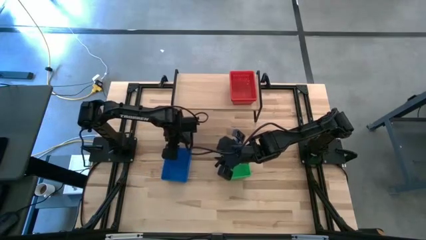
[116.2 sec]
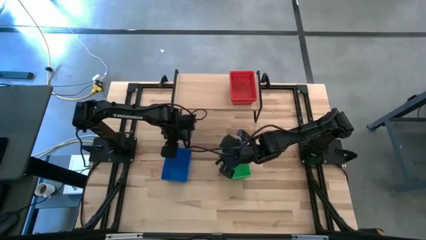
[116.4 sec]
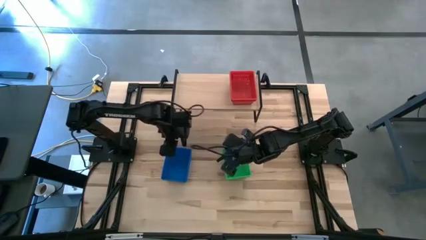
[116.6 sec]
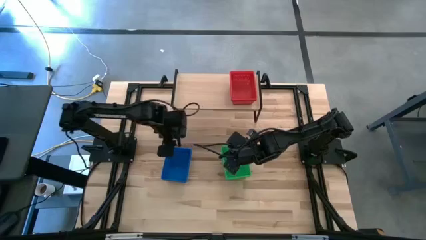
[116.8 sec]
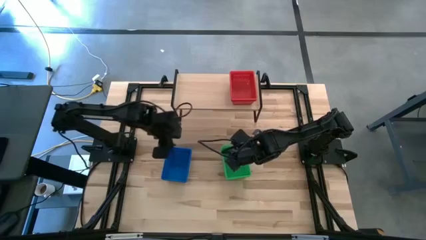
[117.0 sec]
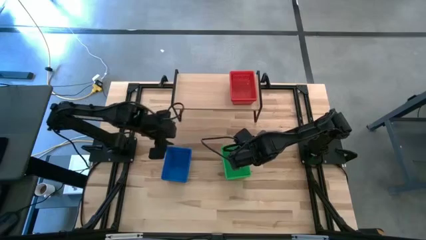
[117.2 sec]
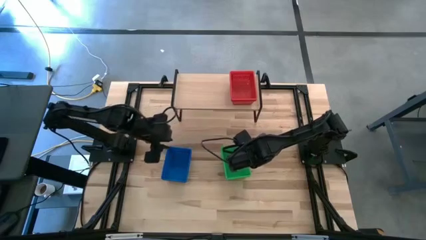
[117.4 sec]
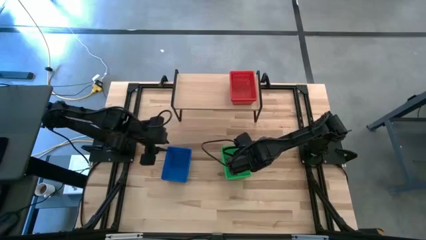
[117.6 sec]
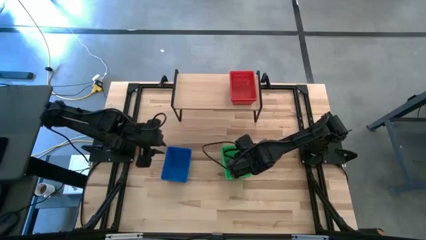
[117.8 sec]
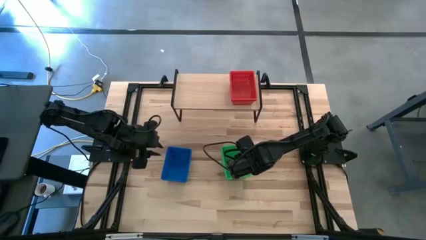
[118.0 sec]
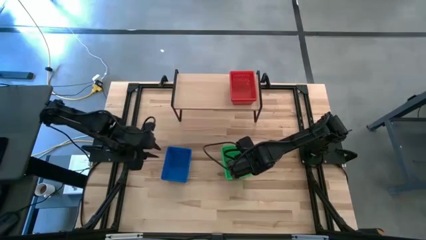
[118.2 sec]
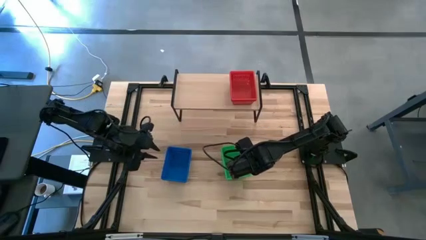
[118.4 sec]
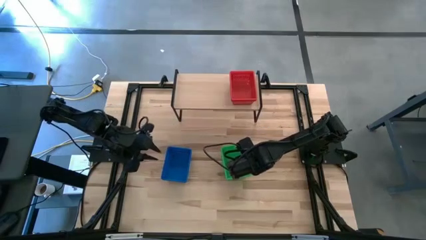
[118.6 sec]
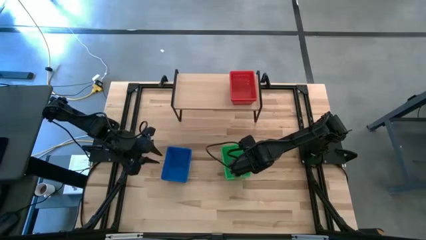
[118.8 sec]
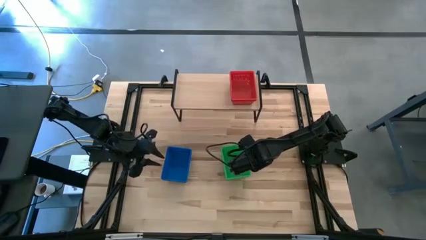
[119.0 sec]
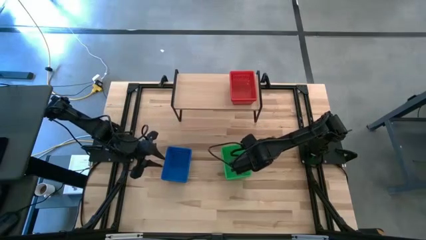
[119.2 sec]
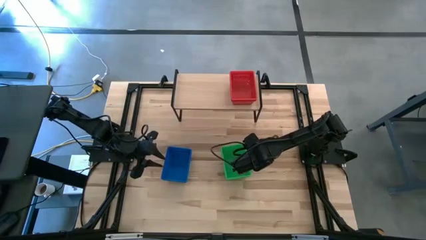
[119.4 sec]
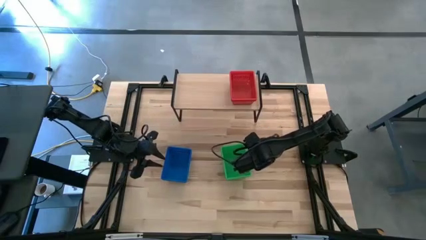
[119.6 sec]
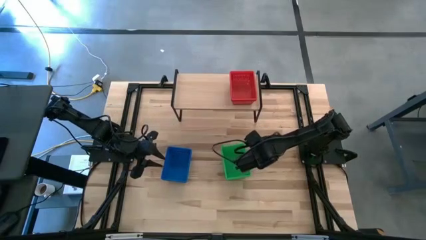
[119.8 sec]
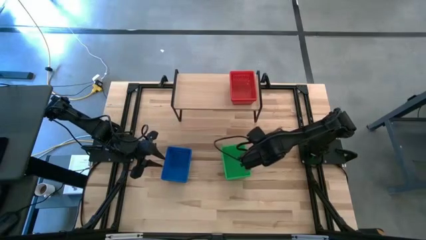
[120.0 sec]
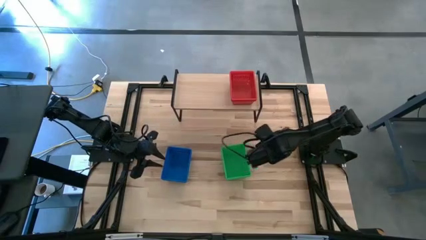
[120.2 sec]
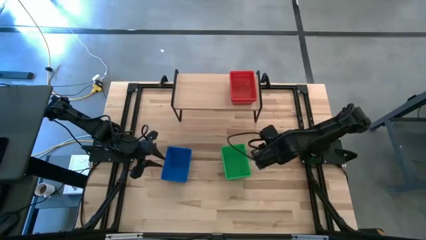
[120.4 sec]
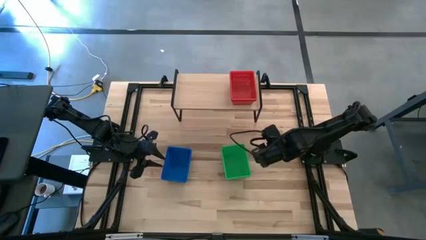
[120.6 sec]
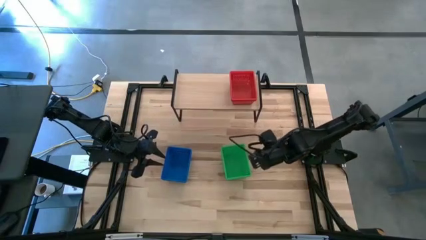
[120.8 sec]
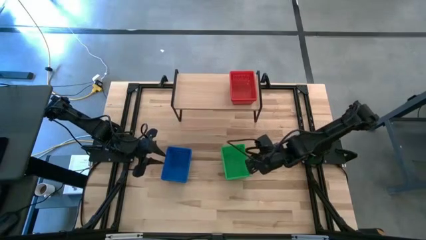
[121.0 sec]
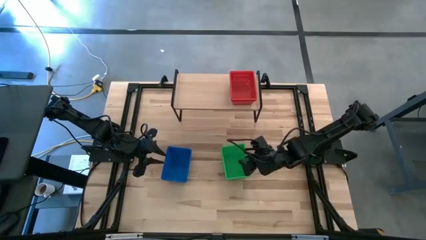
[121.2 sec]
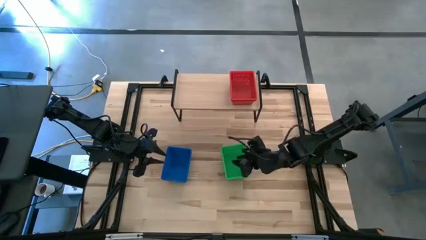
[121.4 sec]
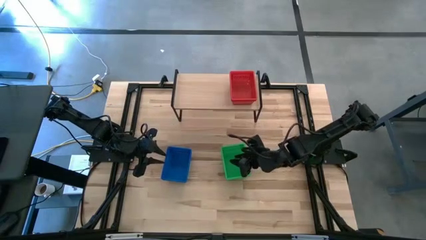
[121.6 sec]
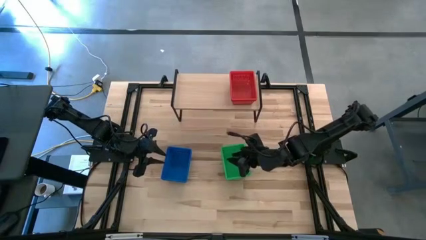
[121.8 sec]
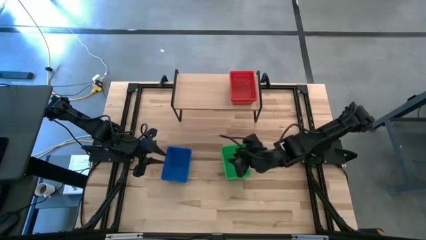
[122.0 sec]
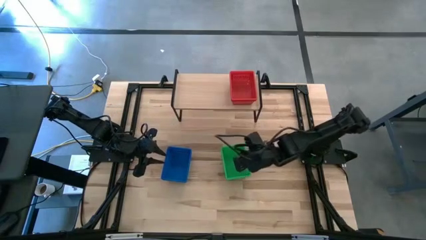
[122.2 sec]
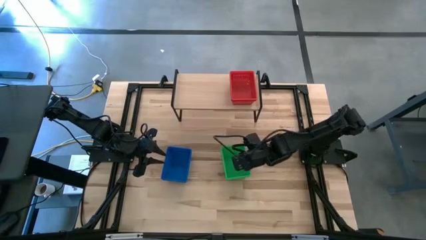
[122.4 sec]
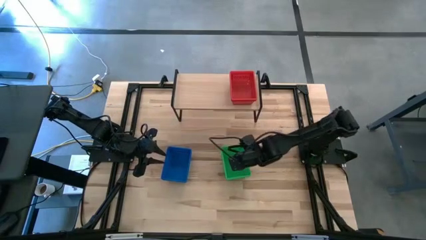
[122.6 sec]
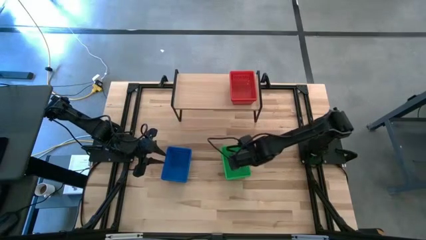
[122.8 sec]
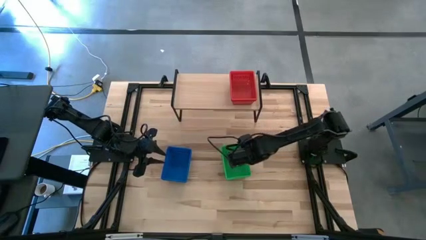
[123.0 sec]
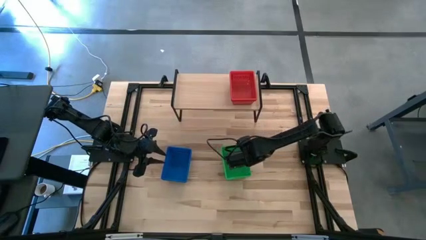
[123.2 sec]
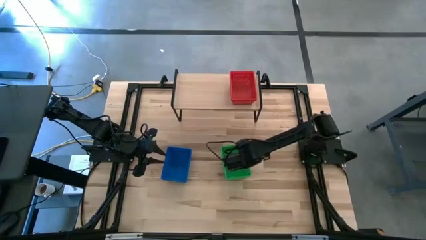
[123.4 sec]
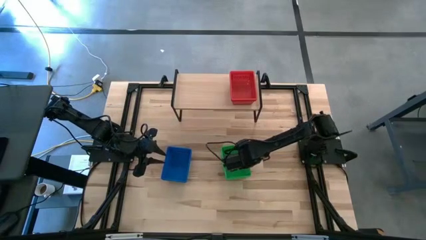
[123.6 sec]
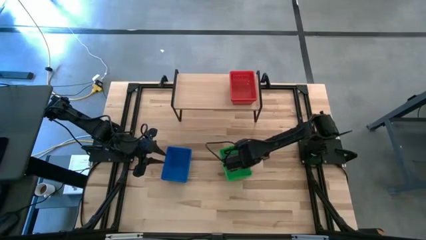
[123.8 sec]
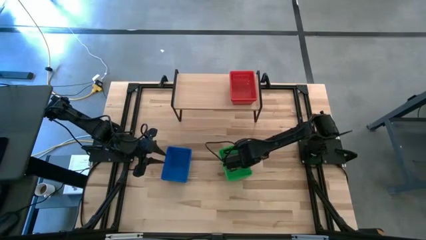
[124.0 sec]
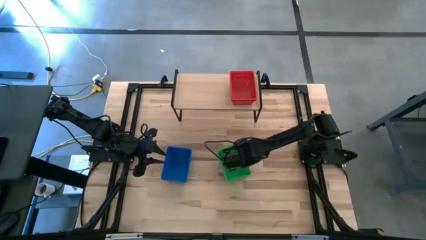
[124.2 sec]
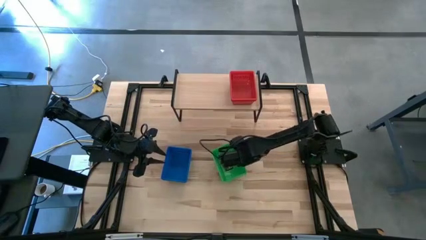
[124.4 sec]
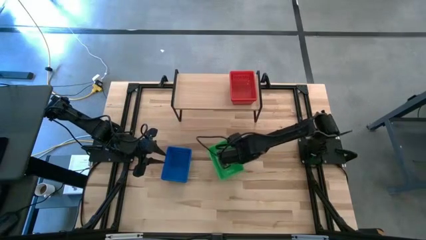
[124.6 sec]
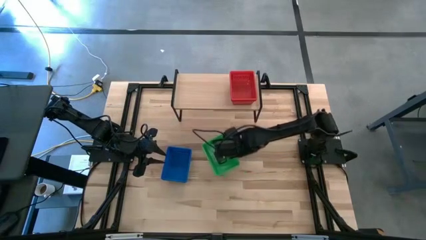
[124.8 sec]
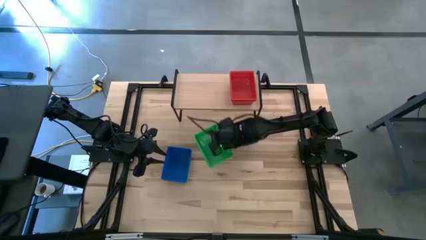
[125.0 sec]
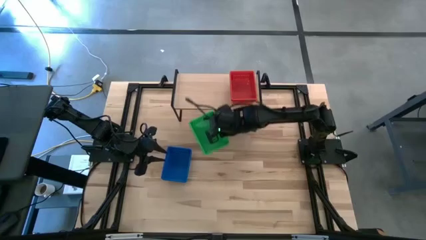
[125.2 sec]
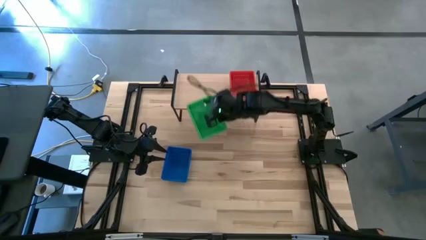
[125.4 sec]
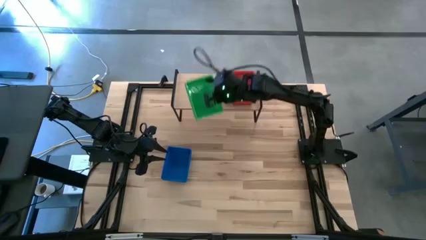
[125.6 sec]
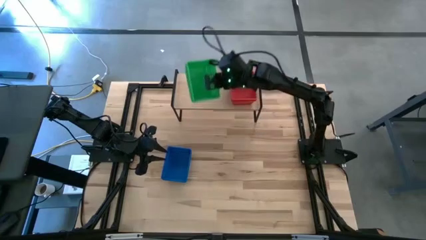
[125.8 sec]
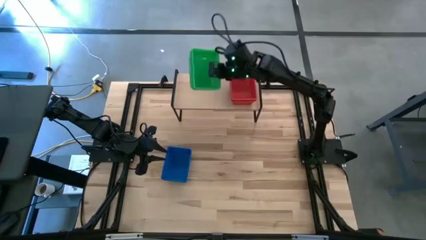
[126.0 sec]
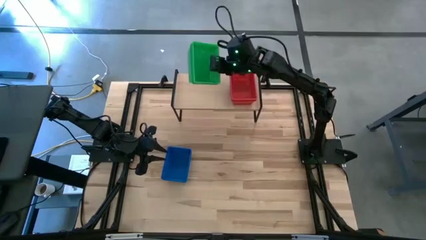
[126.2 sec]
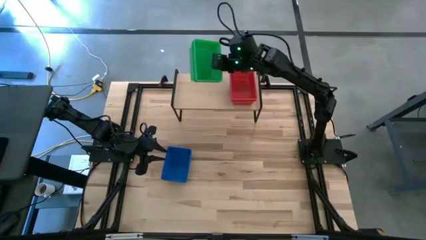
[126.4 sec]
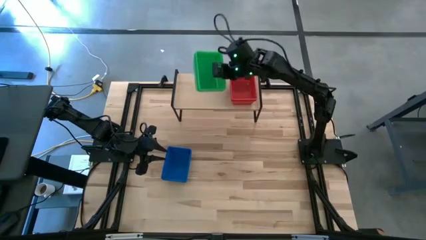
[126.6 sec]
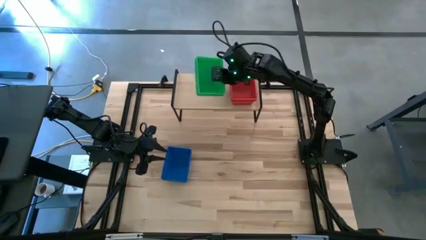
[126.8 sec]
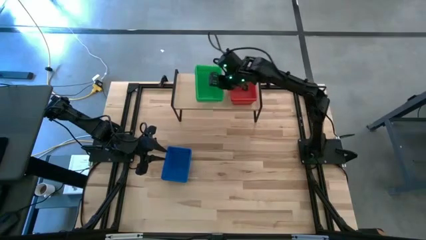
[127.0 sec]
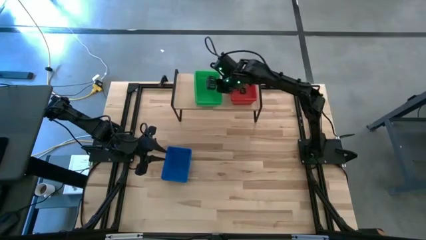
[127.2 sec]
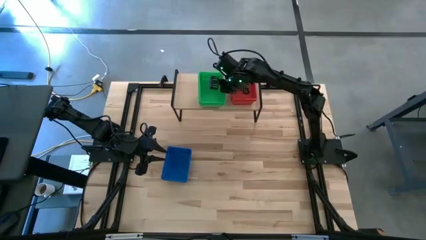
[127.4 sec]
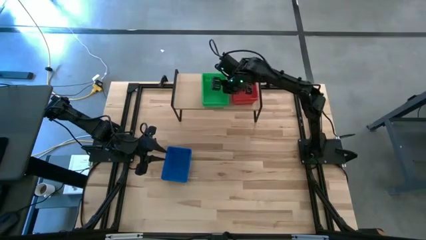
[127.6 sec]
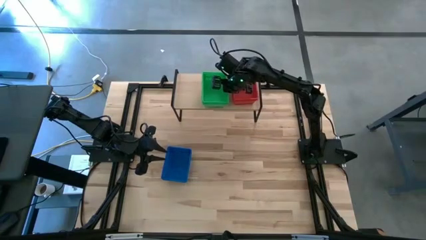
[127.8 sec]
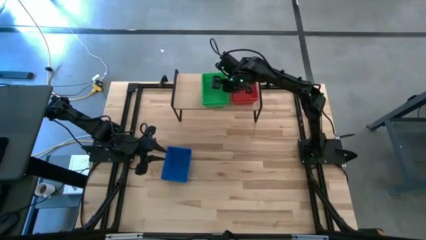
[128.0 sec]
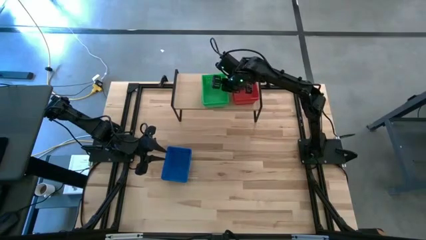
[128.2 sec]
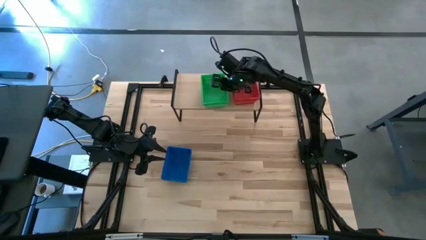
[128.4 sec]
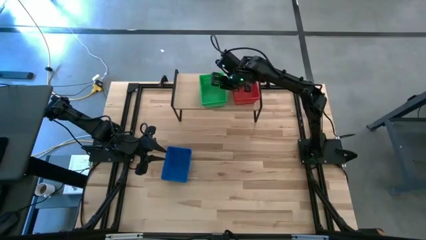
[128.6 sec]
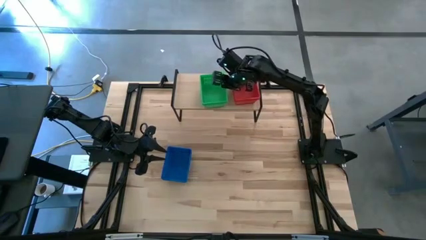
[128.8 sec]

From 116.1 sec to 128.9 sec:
Task: Stack baskets on shelf by color
Put the stacked green baskets on the shelf

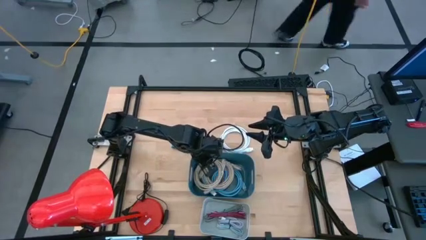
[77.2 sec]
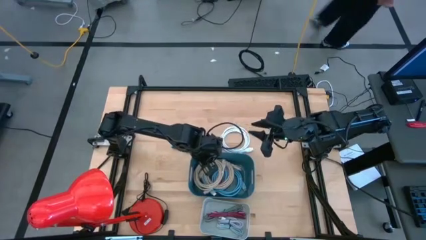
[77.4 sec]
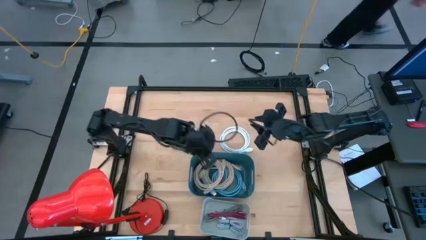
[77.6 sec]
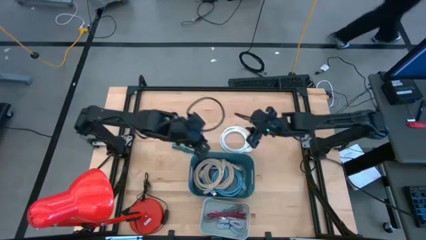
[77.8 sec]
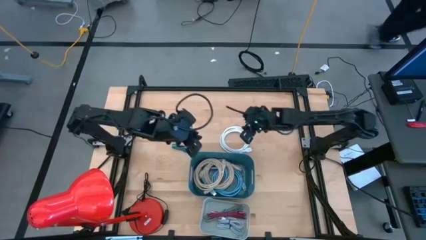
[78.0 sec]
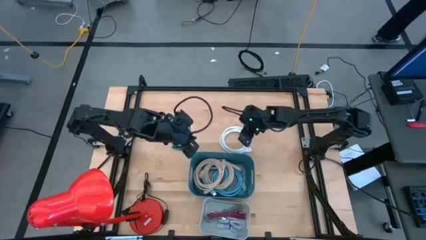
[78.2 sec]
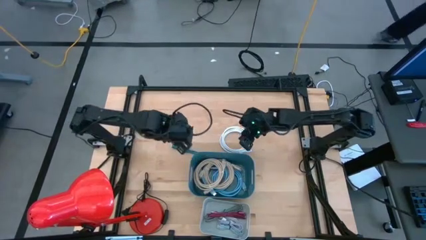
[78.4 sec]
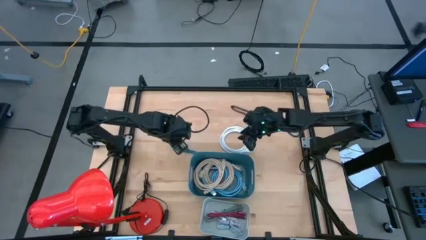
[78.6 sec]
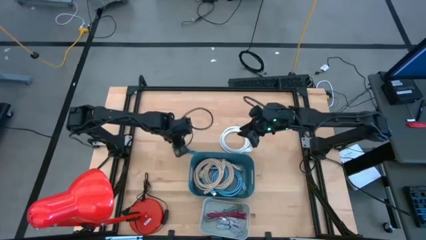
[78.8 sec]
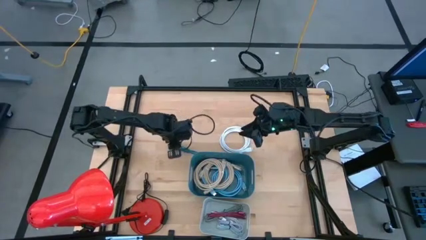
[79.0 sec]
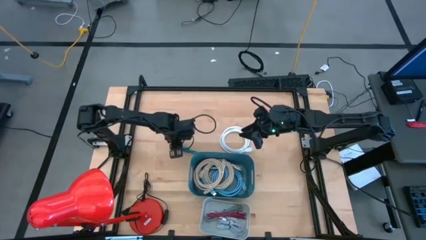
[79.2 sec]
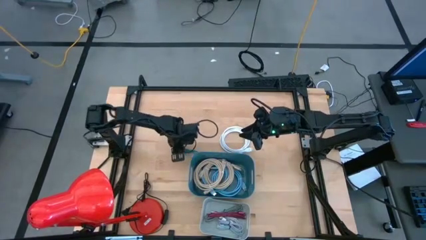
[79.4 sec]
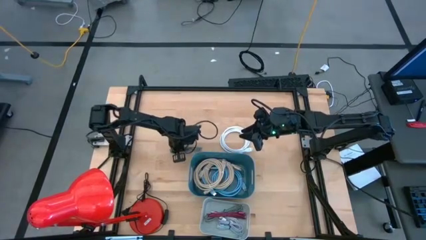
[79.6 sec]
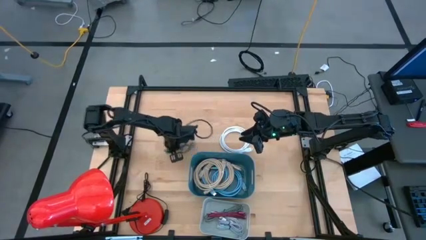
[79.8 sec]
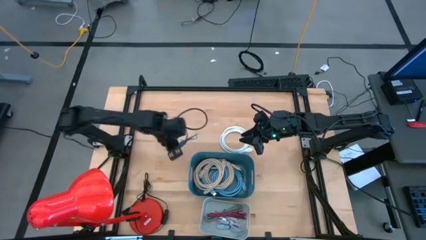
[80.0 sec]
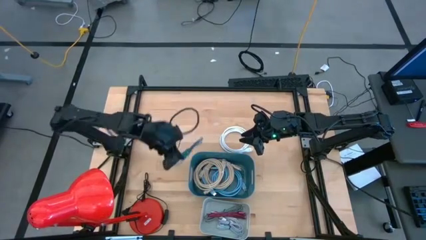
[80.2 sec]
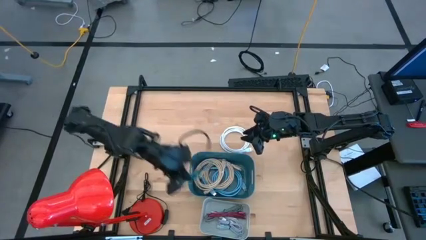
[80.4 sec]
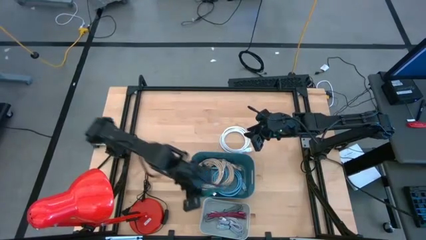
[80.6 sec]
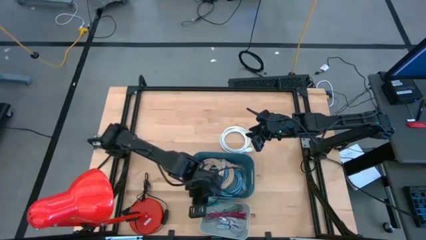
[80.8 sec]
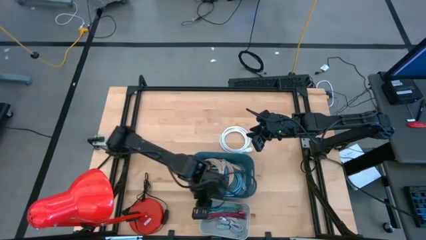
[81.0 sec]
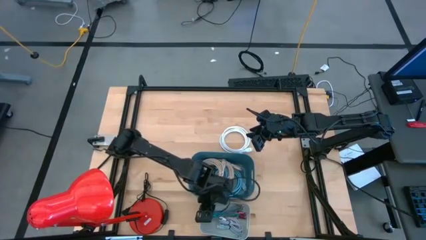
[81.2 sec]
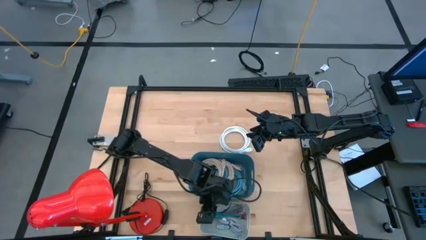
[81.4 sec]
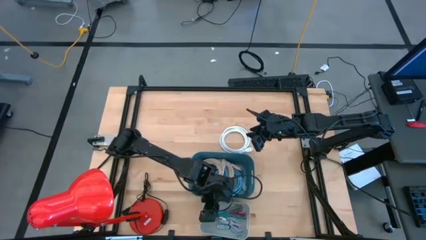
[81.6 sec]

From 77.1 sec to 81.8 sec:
Task: Pick & Place USB Port
Put the black and blue USB cable into the gray bin
